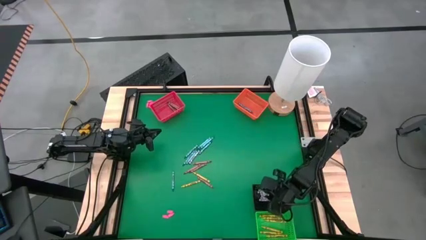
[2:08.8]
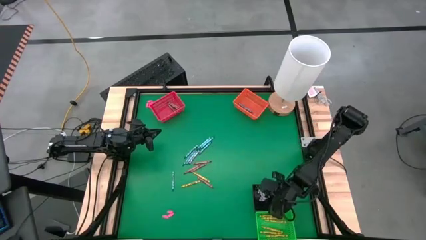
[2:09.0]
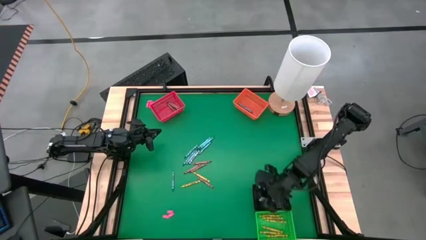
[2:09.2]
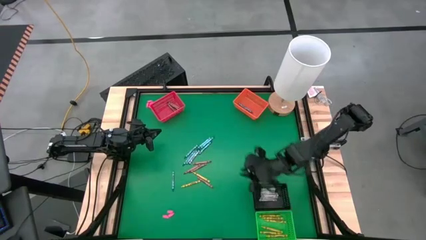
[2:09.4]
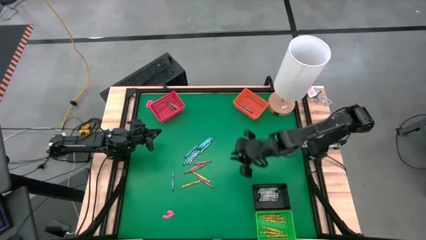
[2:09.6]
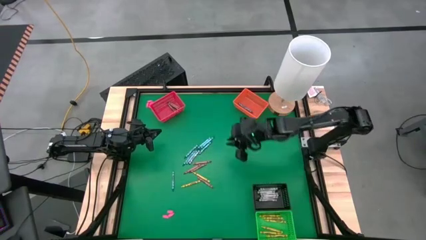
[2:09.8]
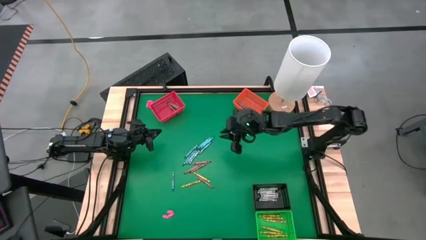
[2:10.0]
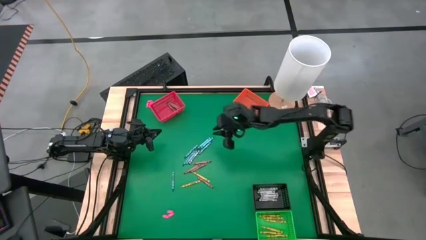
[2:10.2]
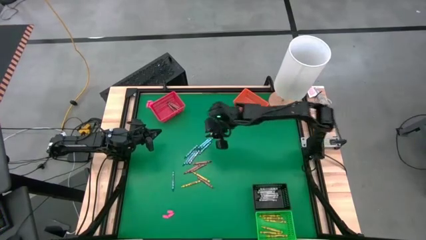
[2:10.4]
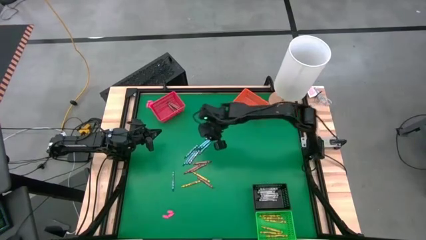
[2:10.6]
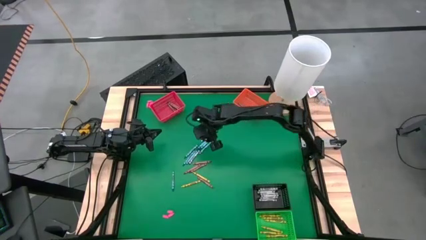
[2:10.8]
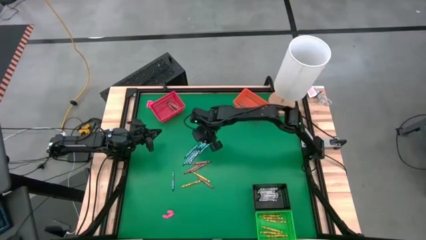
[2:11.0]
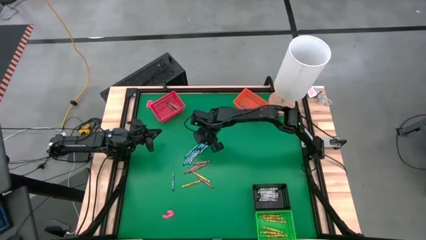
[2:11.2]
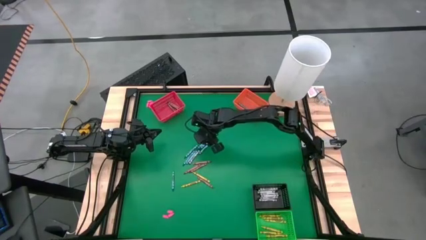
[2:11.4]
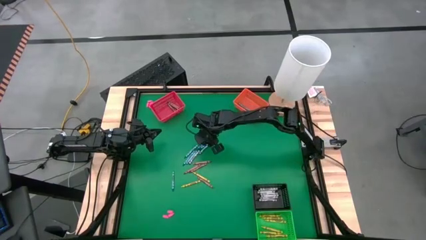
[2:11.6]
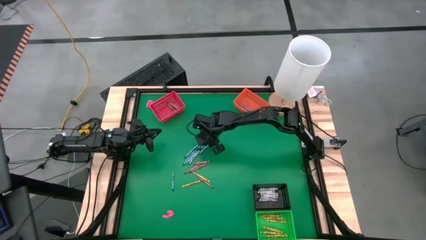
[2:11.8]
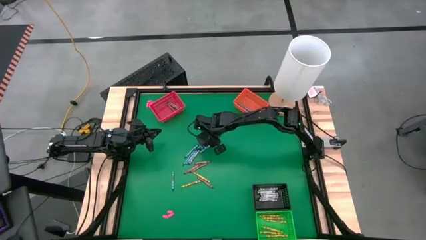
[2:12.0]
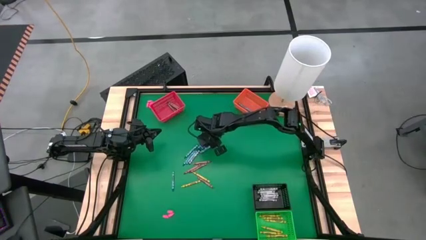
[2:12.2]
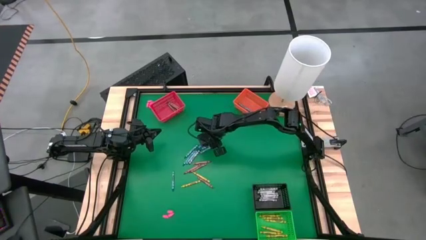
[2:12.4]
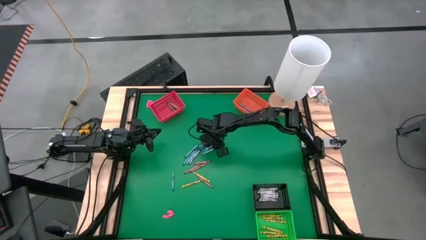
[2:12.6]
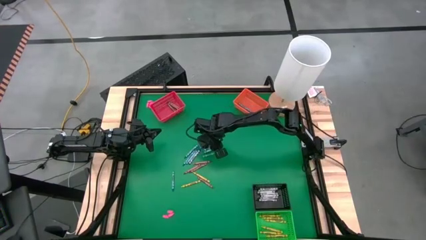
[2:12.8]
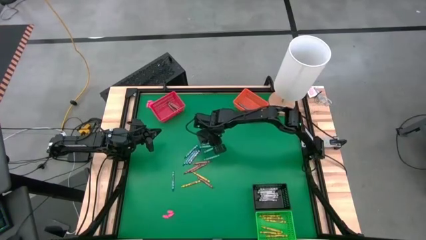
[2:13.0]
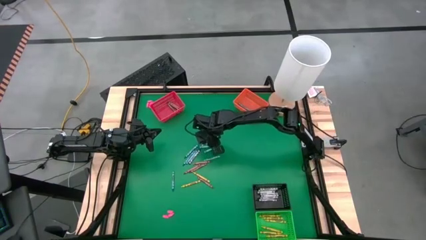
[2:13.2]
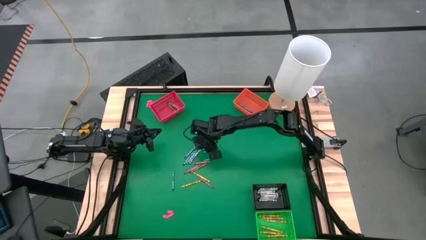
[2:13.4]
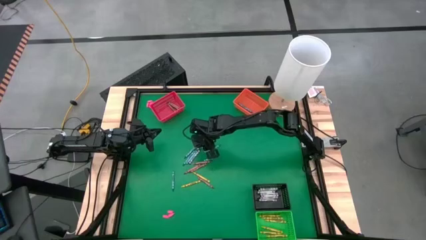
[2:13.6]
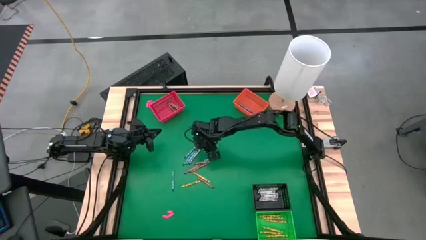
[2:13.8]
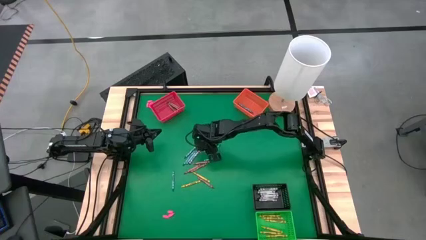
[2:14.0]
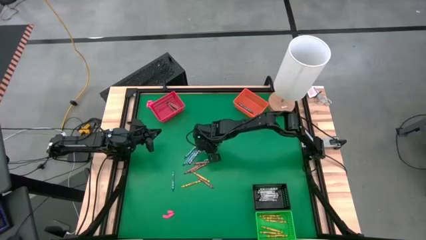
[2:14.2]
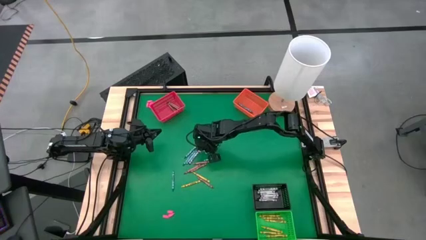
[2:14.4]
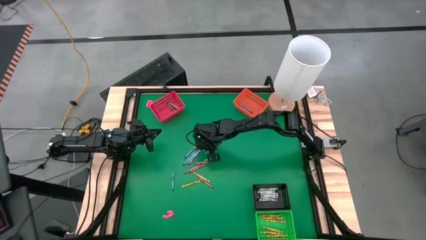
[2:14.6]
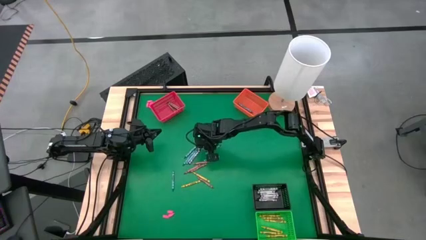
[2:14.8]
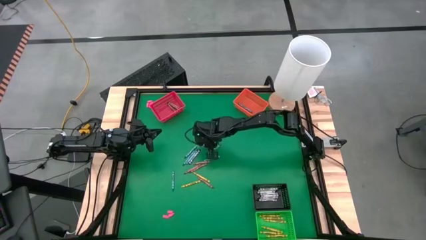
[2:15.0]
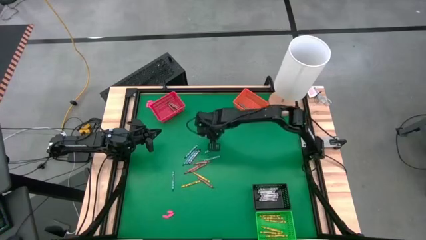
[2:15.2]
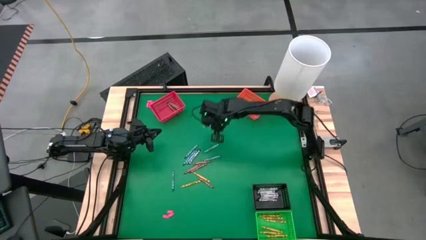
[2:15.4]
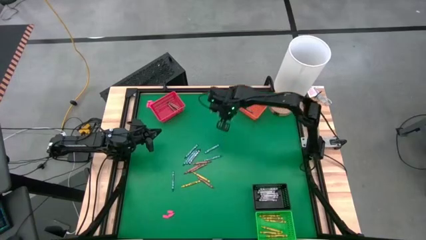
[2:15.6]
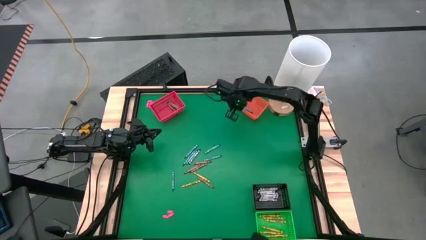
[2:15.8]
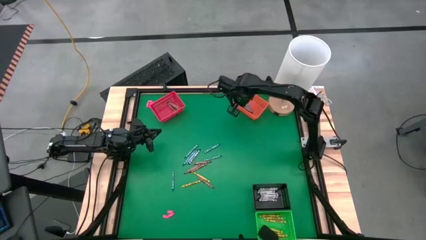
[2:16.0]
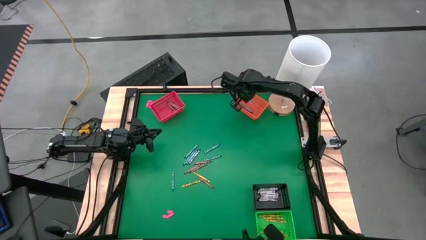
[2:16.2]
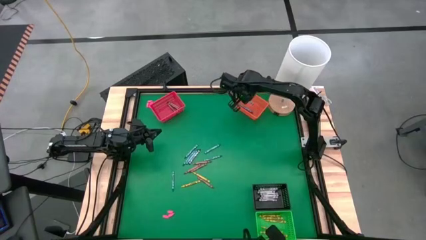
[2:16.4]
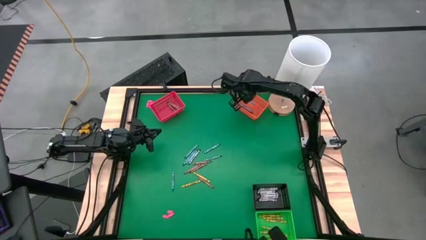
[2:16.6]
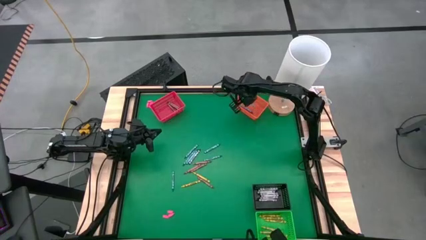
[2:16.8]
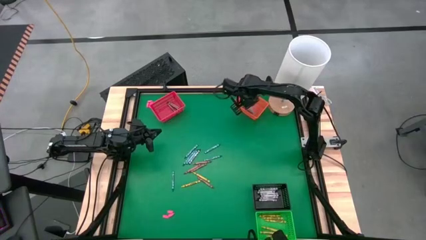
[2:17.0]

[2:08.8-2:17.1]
Task: Sort crayons
Put the blue crayon into the orange bin

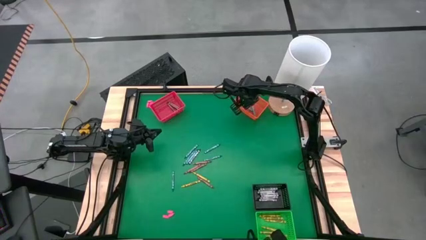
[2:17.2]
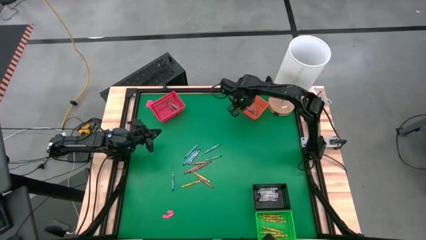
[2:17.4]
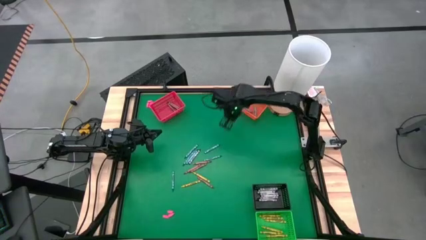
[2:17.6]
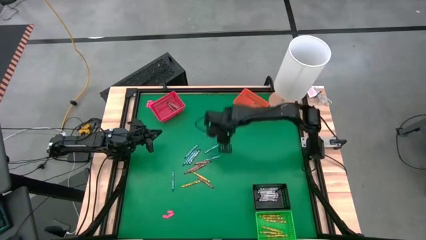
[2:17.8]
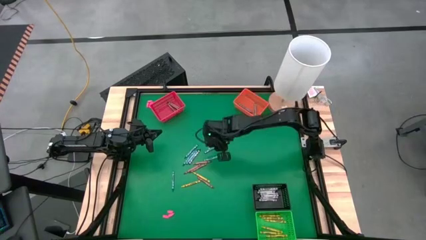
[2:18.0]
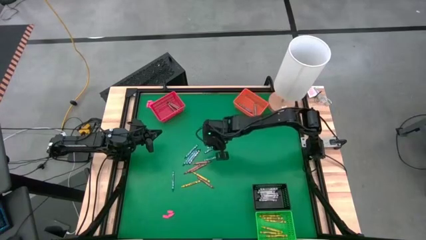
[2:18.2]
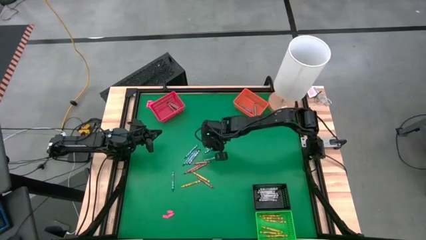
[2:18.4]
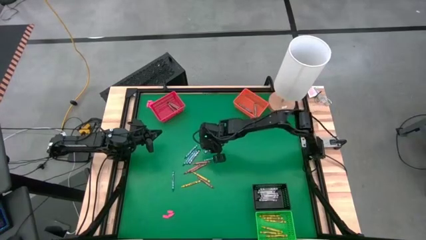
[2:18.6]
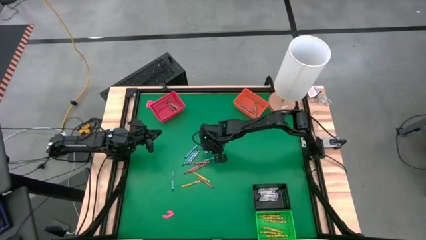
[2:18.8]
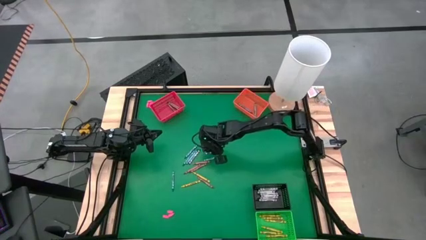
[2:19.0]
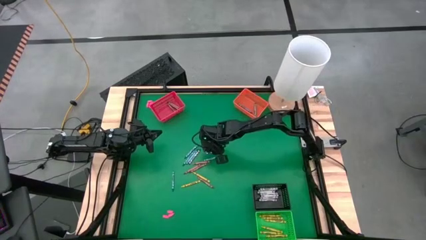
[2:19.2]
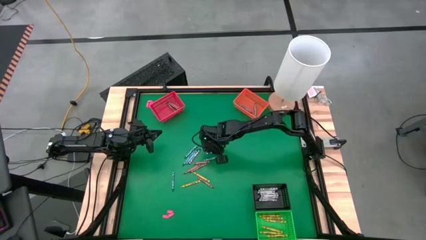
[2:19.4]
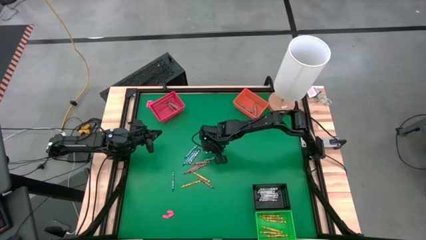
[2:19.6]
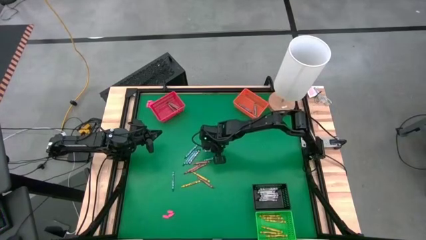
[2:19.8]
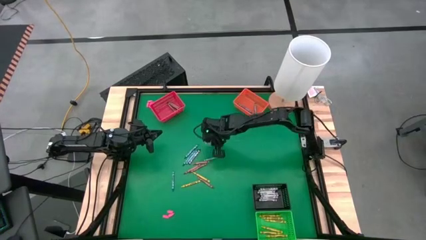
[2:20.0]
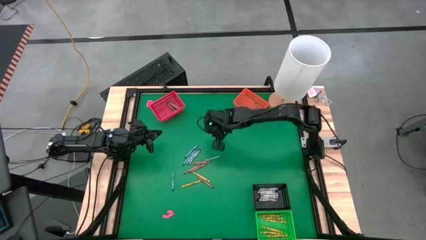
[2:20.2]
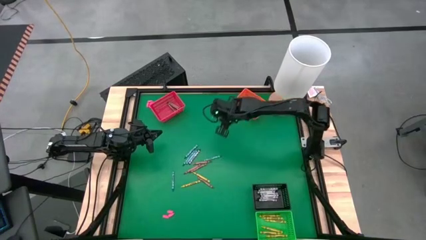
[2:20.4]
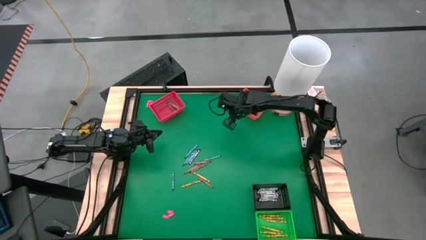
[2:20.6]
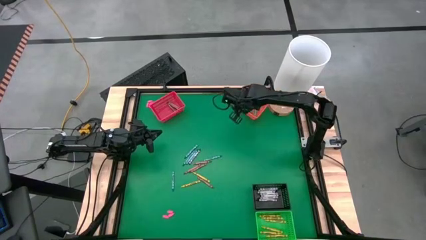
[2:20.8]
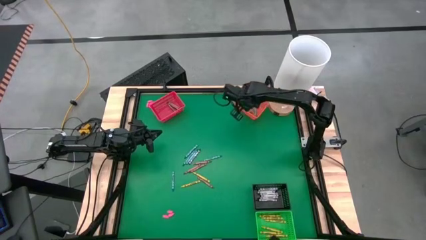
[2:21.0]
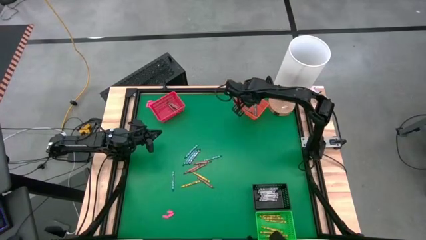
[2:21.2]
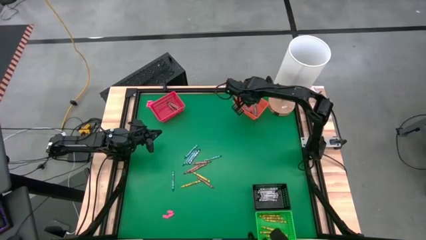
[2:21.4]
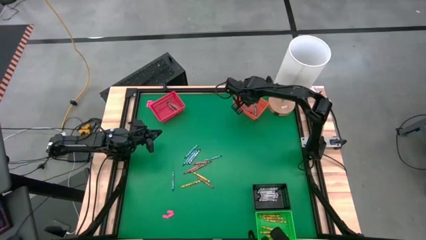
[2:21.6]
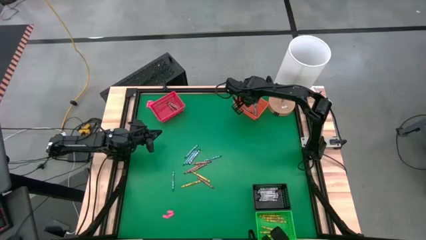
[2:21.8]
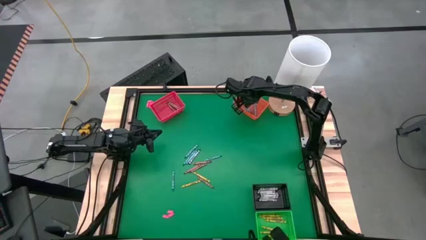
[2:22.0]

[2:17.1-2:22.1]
Put the blue crayon into the orange bin

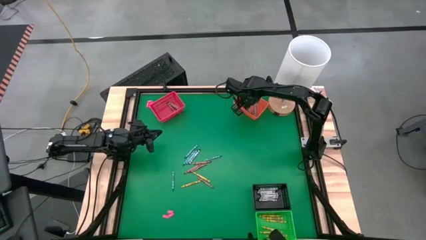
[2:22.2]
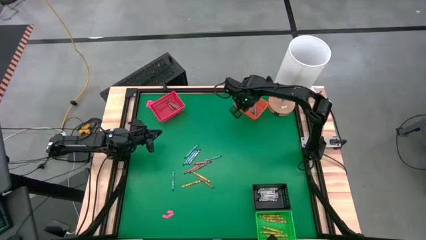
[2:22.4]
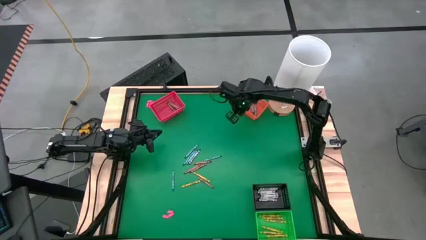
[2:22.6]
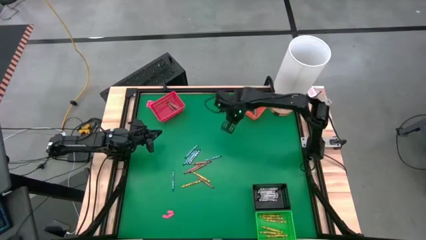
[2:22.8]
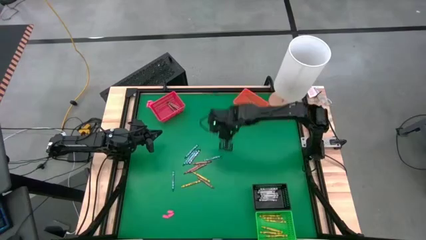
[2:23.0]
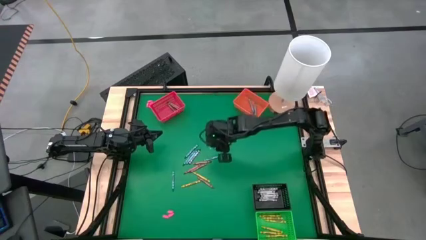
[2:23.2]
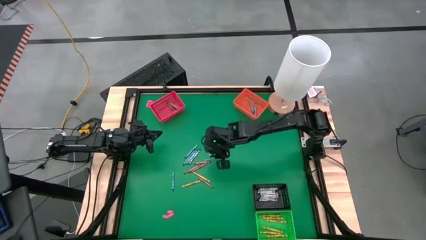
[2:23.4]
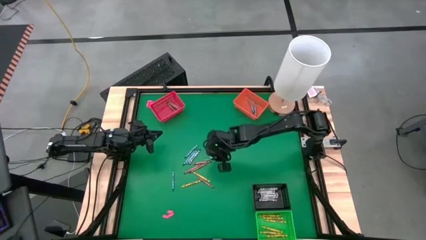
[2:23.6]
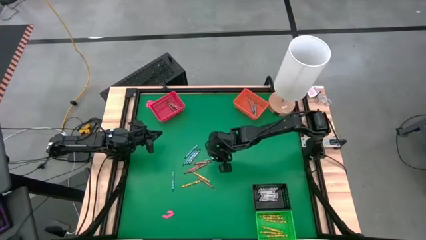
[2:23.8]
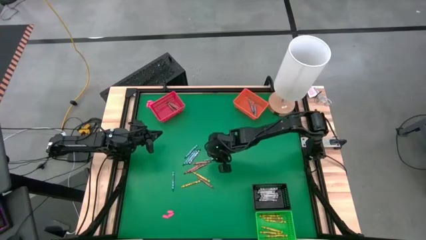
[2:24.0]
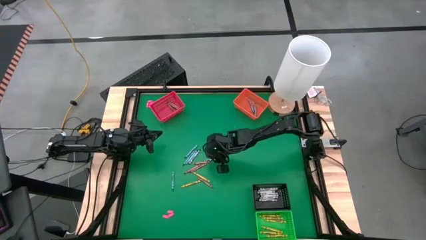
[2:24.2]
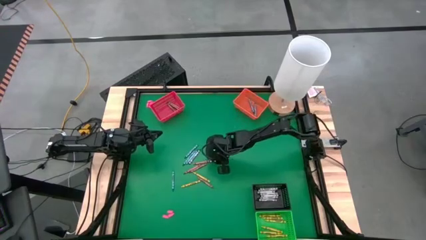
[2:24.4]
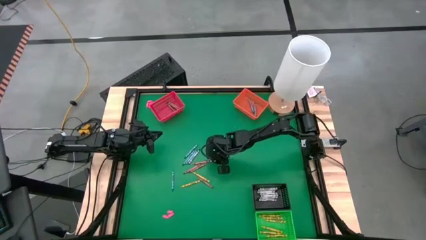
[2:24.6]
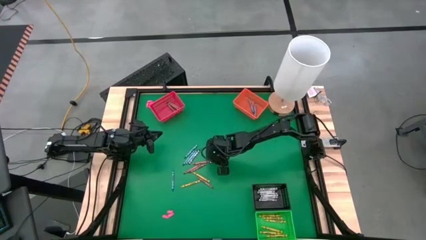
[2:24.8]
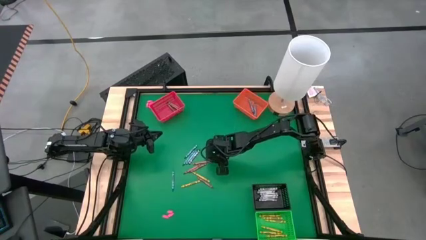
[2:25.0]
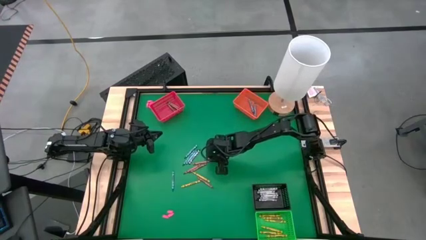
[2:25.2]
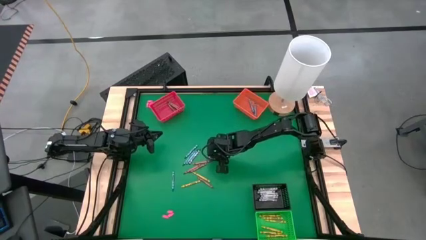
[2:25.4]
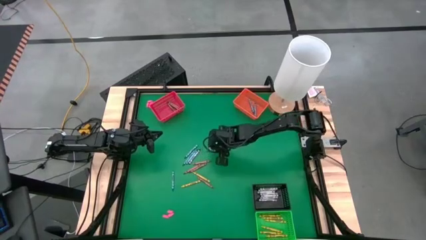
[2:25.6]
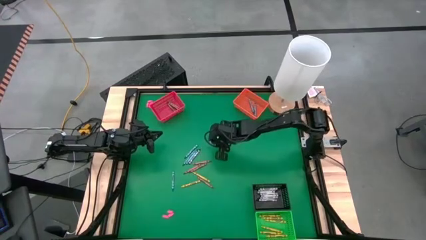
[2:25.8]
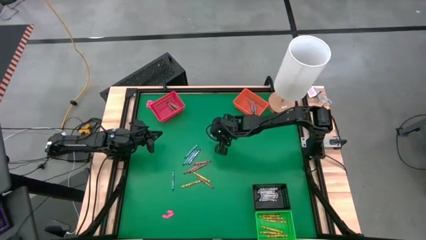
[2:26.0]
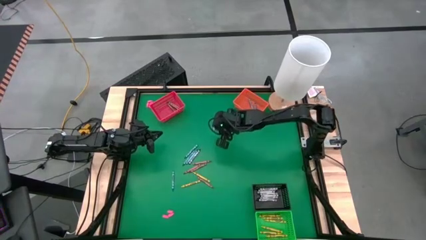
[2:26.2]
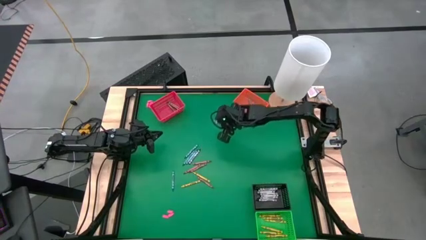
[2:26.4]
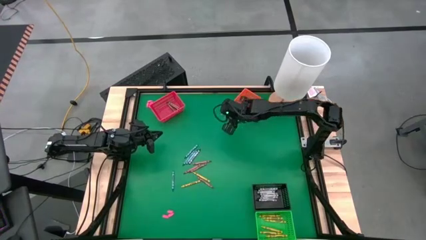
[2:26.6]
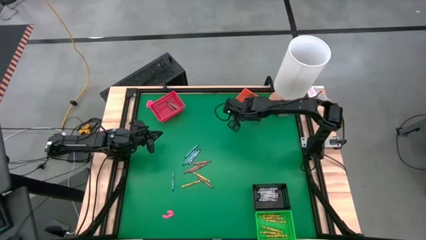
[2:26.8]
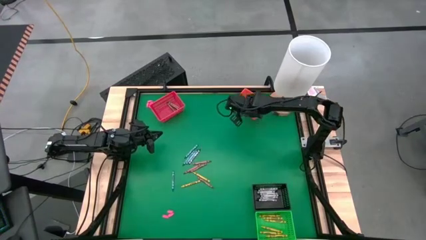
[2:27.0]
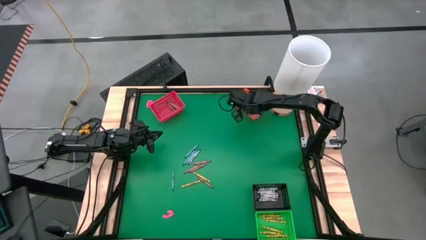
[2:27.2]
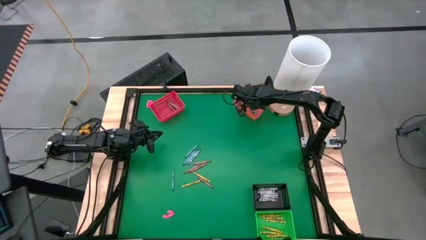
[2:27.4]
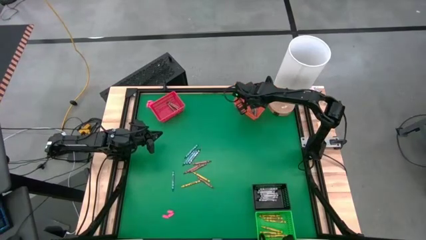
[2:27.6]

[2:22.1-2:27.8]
Put the blue crayon into the orange bin
